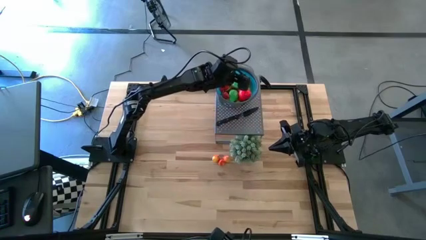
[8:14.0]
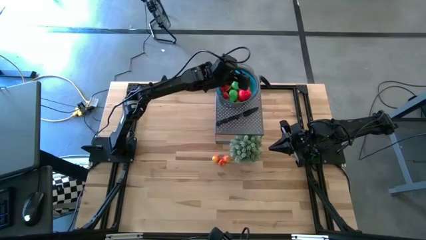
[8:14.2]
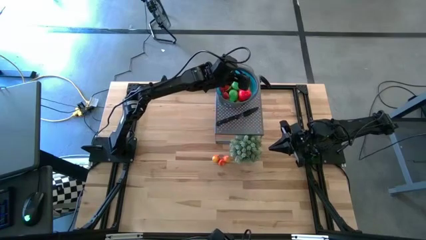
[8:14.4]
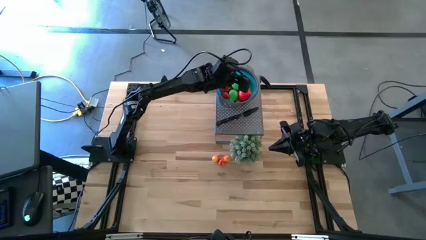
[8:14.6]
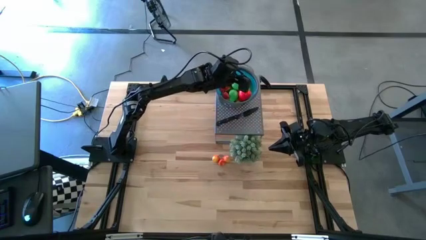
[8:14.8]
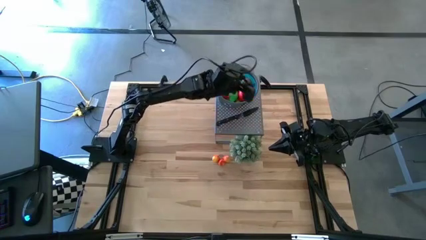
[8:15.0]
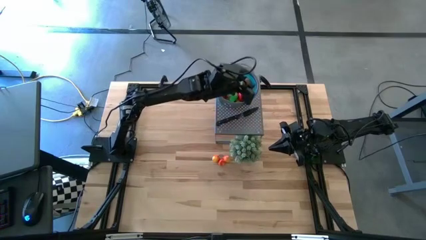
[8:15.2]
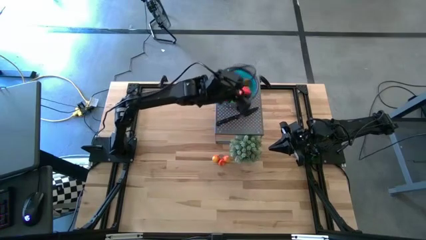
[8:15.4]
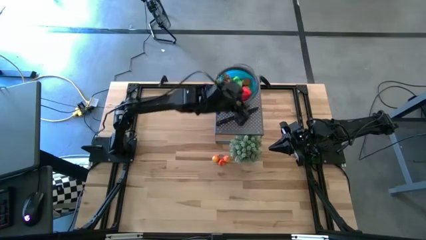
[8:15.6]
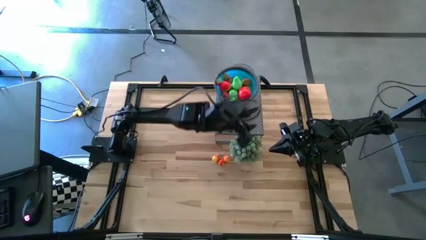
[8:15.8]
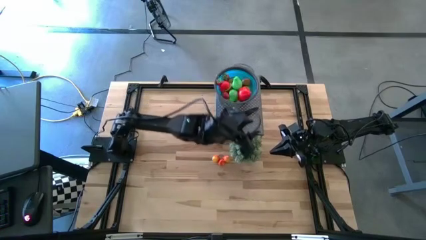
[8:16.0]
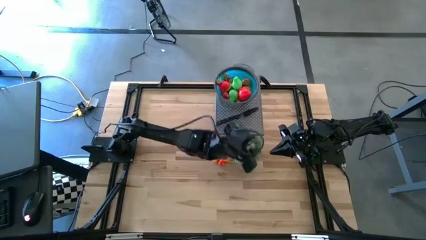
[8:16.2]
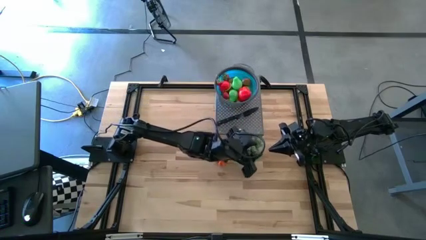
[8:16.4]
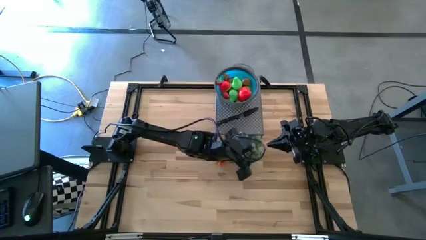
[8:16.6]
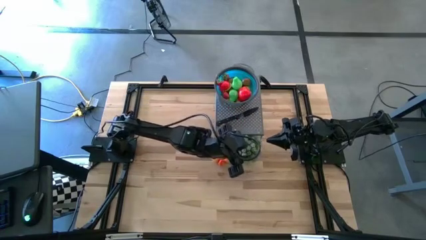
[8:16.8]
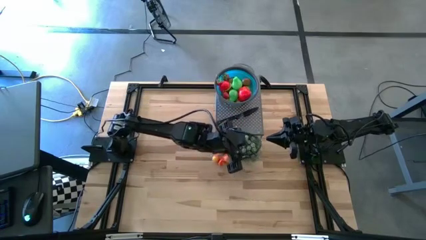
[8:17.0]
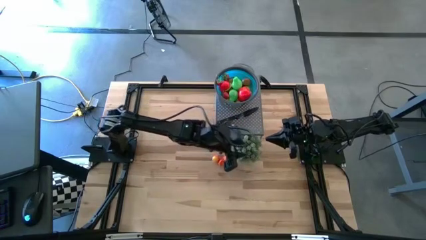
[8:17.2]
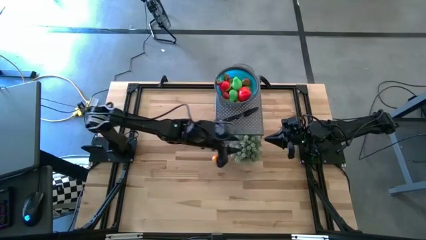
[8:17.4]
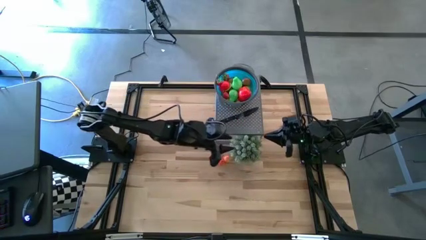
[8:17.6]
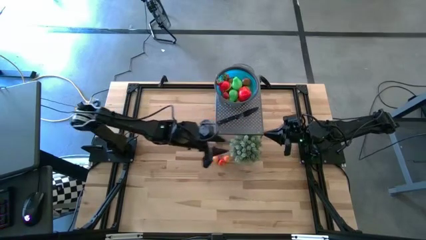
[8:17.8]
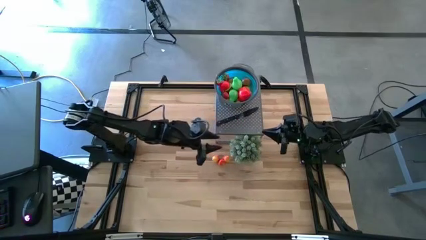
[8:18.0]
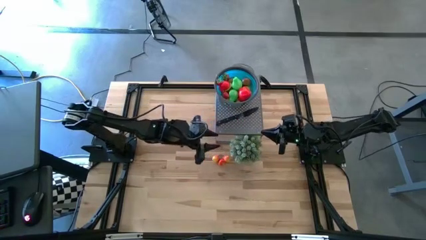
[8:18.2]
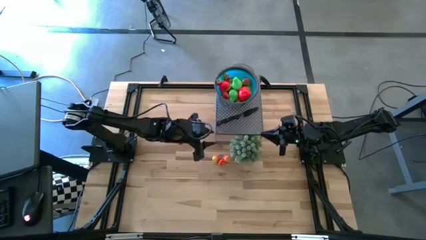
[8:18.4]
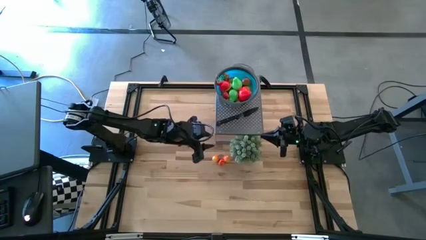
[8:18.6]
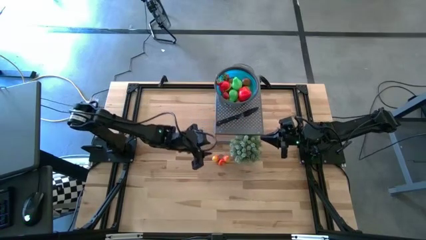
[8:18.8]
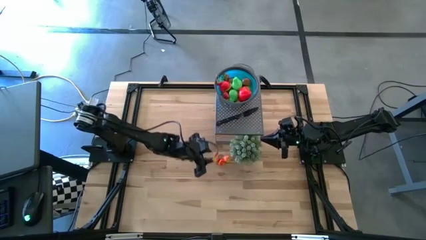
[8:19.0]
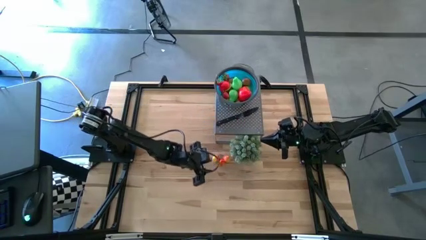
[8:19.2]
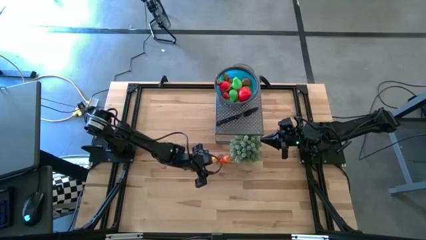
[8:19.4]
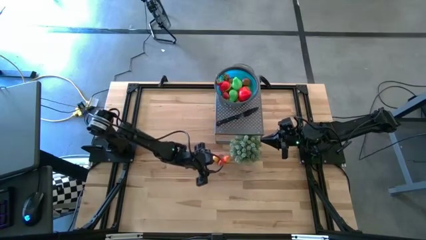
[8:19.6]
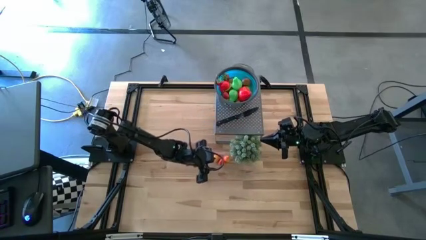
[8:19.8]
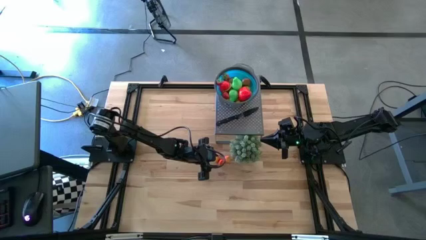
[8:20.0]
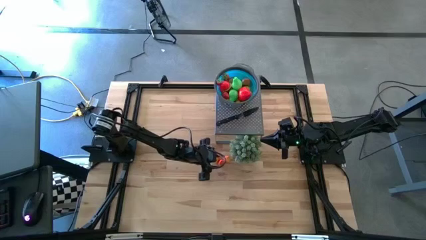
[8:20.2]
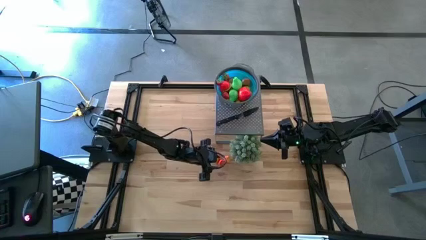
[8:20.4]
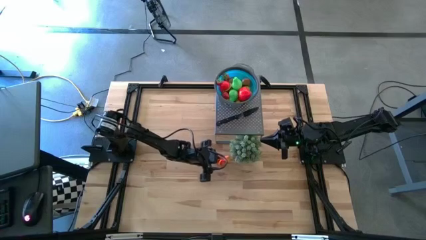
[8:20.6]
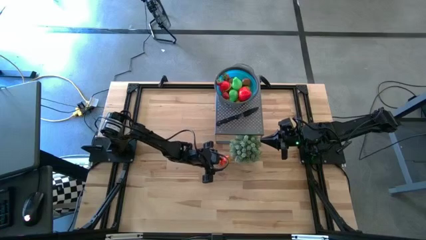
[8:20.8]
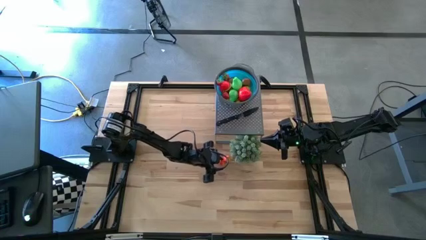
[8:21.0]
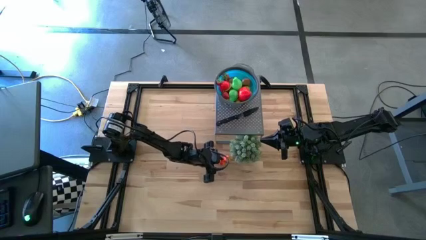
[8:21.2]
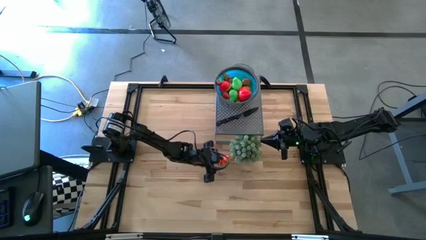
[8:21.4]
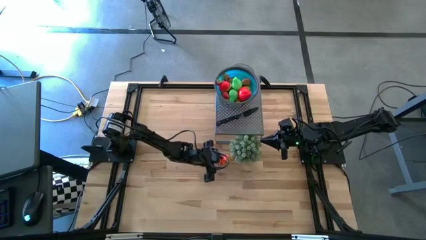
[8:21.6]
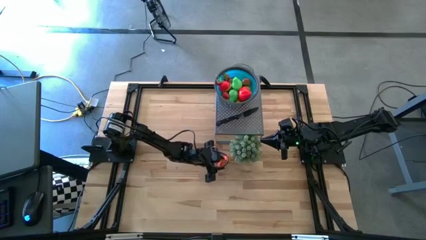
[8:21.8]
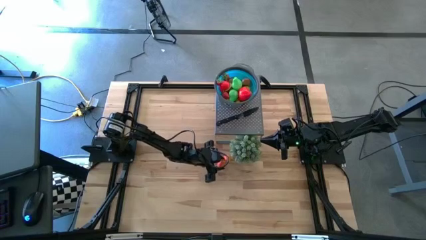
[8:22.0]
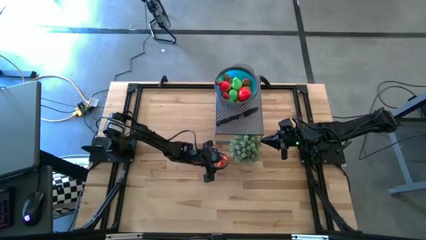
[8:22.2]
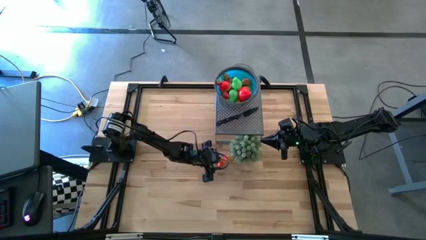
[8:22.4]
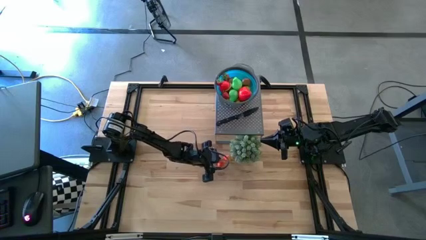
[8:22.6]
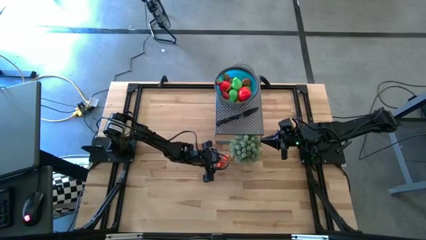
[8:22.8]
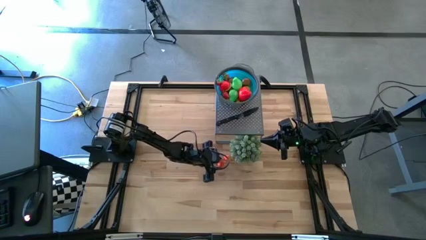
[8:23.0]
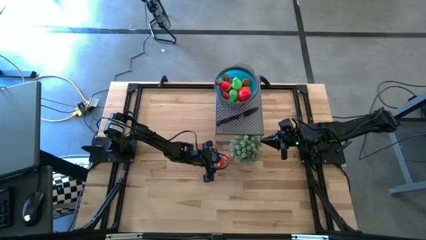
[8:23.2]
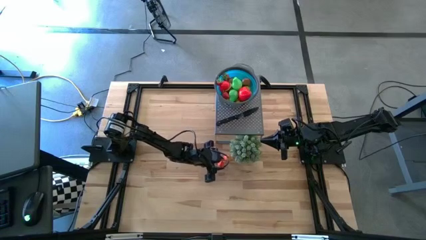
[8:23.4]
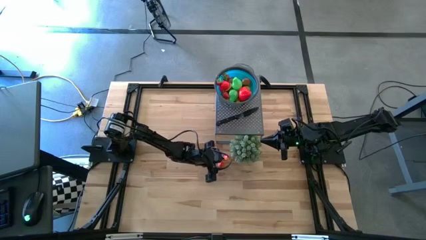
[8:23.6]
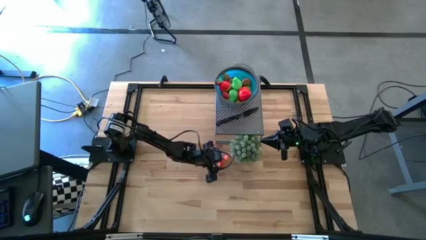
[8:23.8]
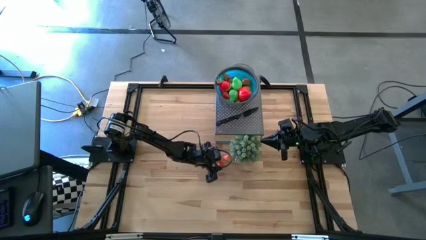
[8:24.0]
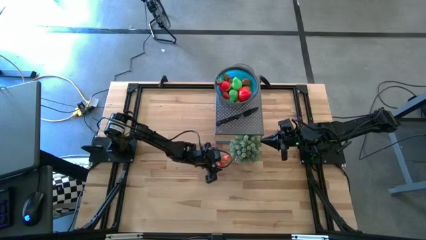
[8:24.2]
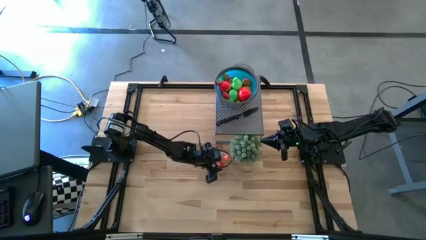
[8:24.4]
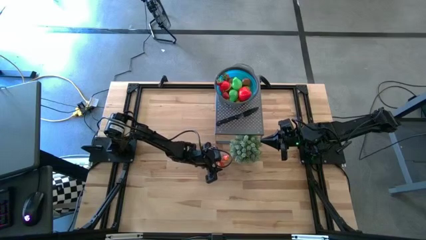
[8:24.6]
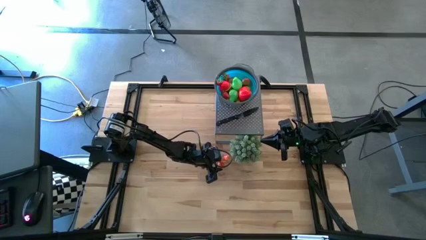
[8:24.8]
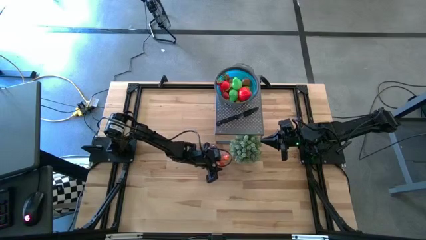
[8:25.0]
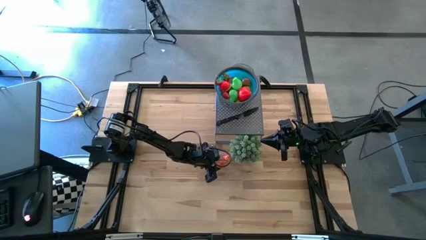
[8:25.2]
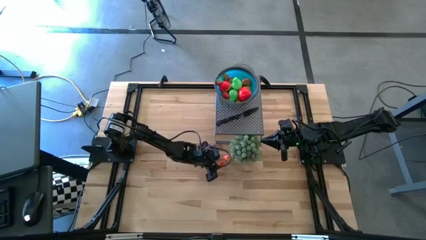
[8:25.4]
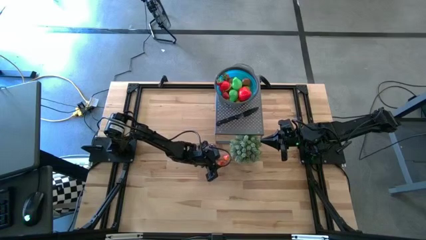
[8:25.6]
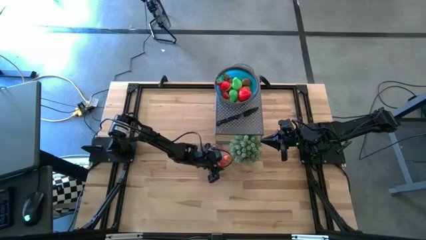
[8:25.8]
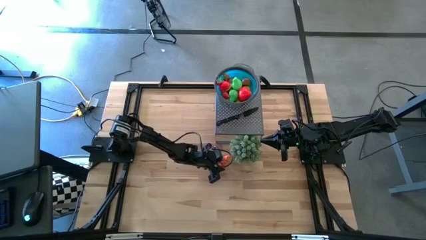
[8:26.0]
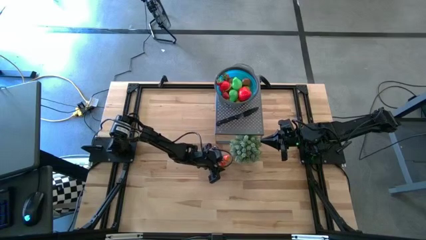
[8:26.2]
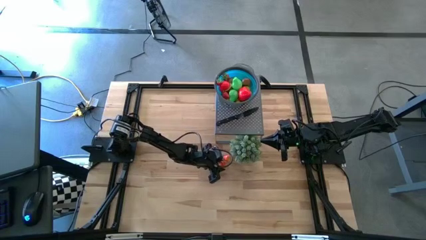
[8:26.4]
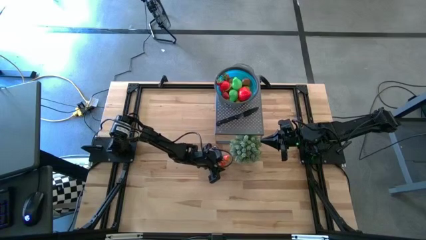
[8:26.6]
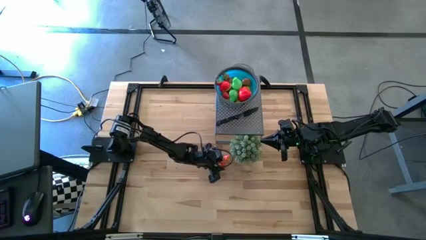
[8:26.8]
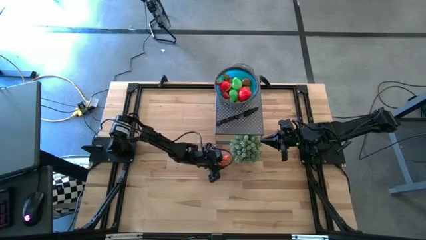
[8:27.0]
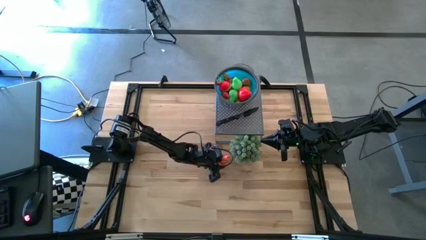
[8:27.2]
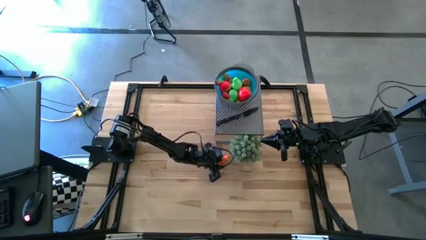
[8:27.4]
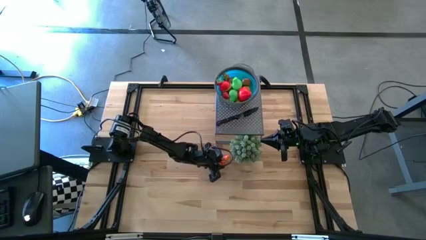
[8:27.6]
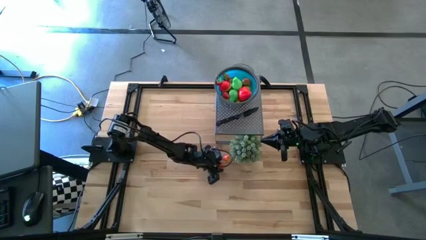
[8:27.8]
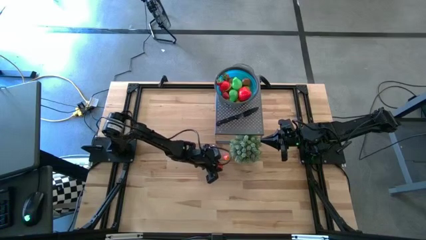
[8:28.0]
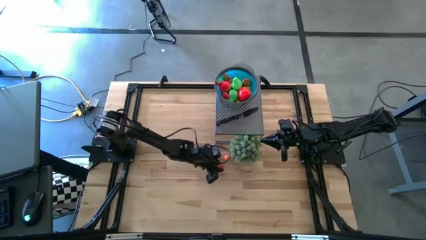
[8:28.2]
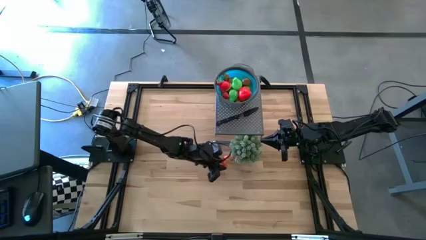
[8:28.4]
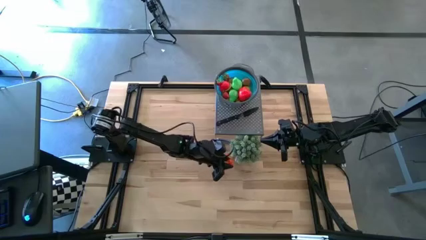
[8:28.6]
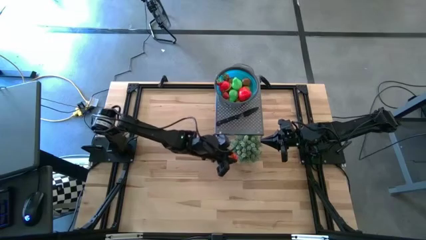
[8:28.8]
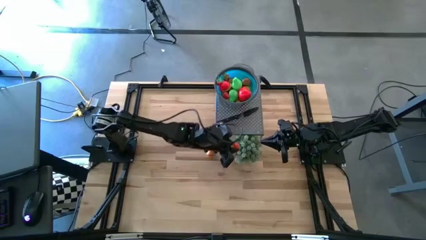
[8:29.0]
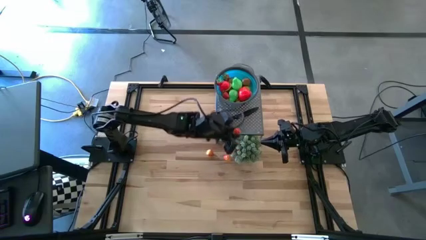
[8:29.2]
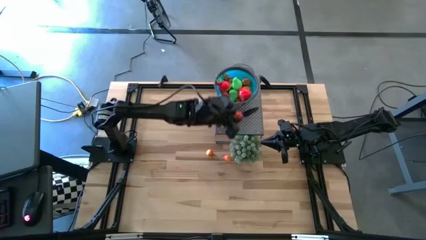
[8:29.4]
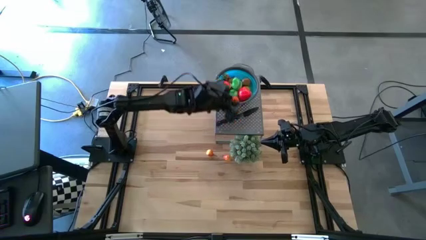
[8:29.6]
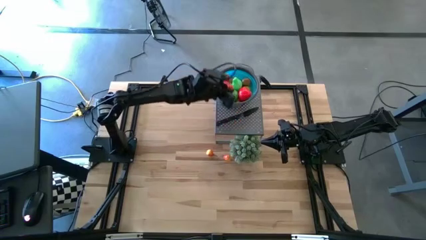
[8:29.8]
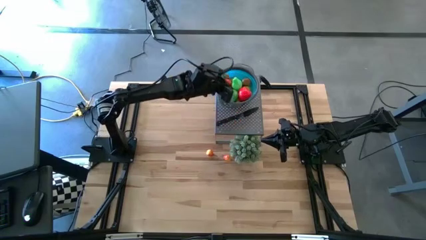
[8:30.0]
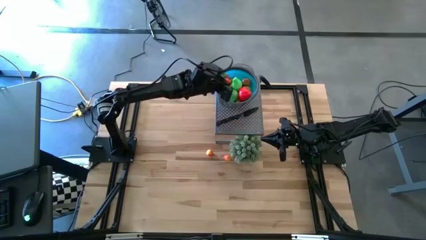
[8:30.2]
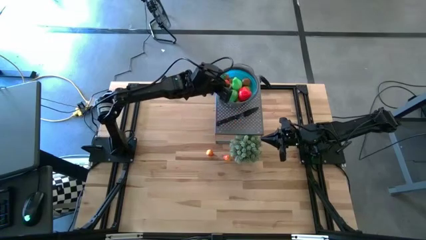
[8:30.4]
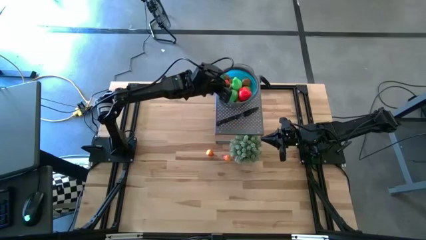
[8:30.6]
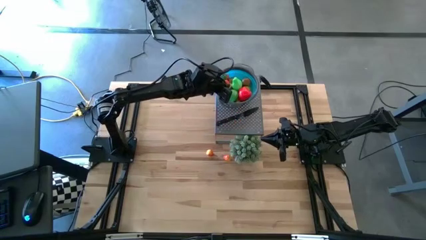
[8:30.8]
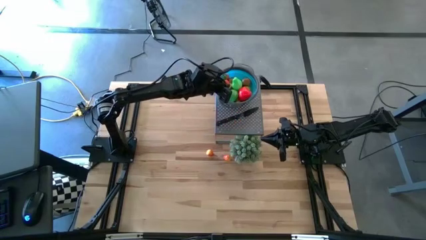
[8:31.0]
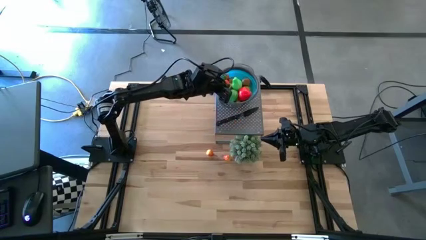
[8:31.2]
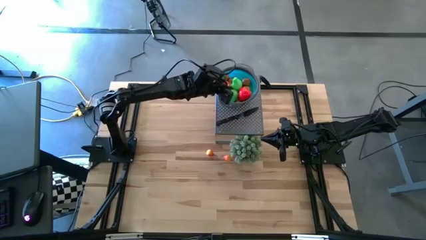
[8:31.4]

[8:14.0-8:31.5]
Task: Pick & Place Fruit
Put the orange pear into the blue strainer bowl

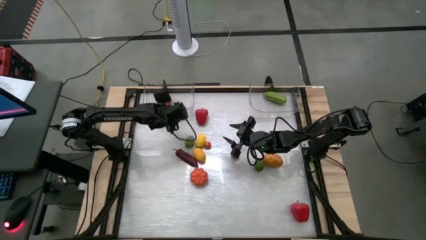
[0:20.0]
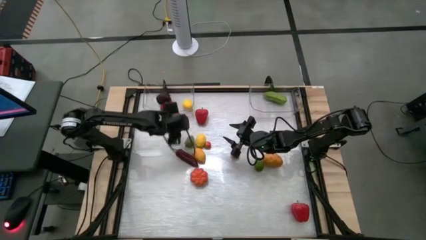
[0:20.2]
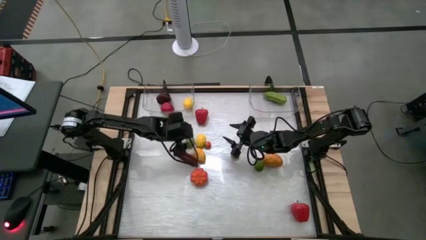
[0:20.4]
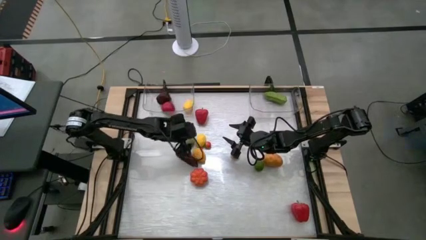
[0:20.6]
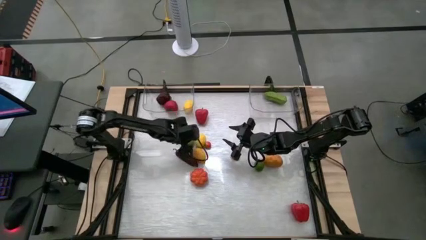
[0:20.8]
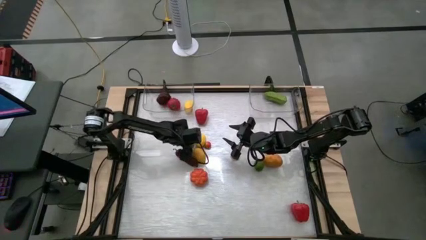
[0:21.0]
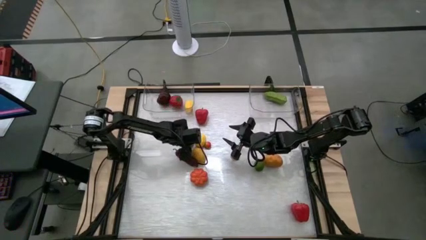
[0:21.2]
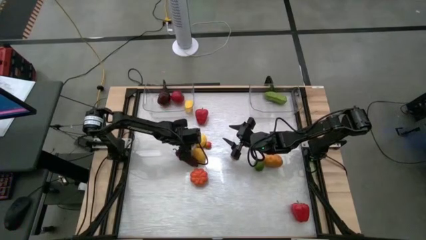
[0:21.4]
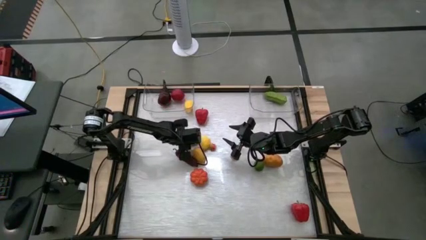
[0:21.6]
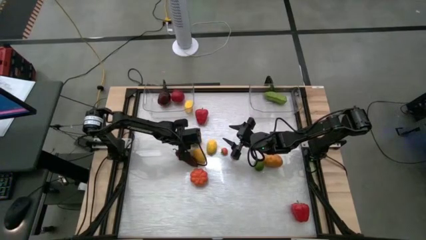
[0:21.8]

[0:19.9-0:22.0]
Task: Sort produce into baskets
Put the left green lime into the left transparent bin
